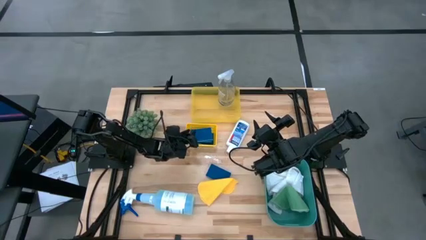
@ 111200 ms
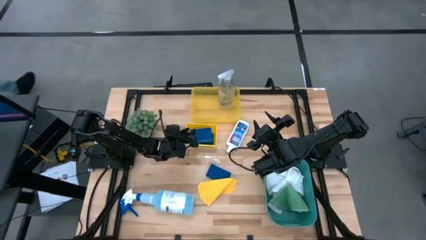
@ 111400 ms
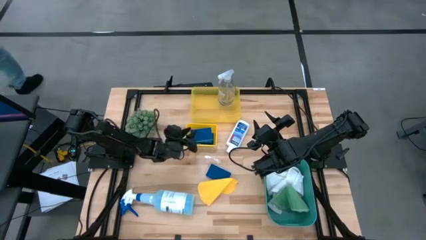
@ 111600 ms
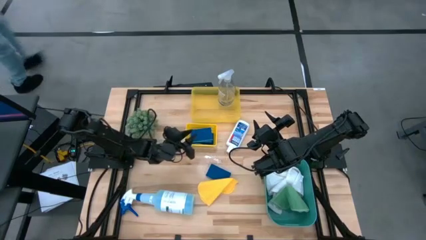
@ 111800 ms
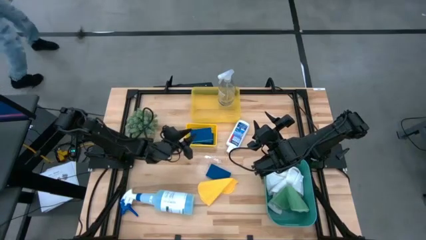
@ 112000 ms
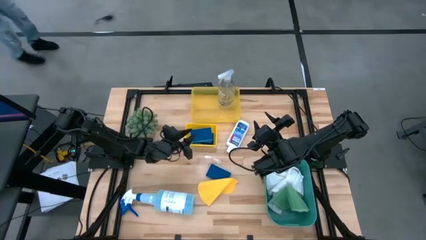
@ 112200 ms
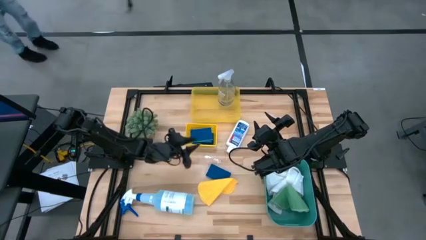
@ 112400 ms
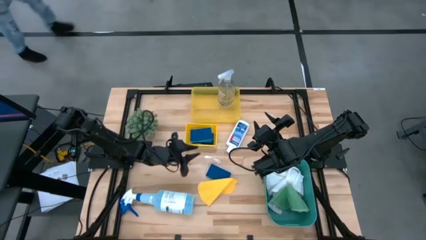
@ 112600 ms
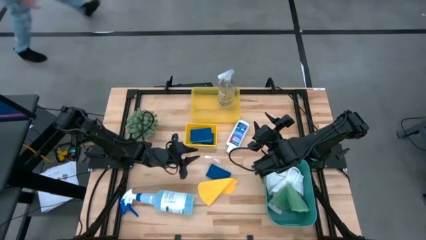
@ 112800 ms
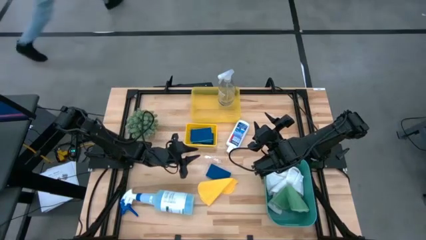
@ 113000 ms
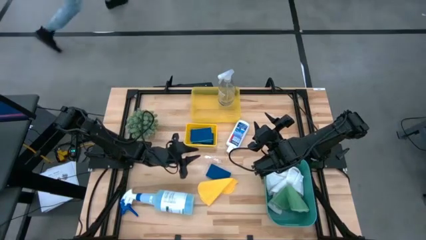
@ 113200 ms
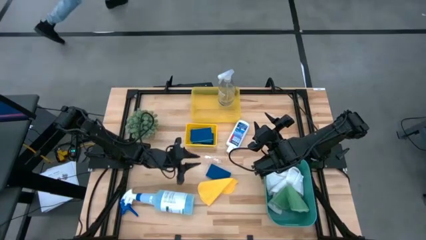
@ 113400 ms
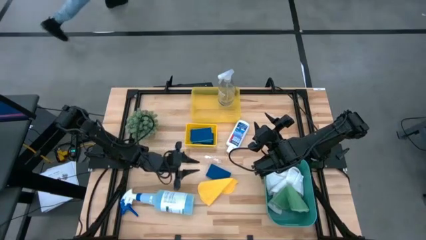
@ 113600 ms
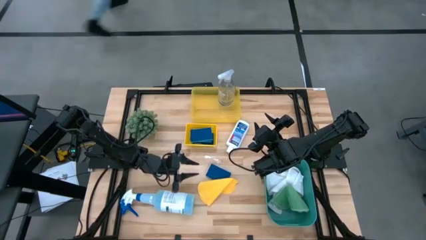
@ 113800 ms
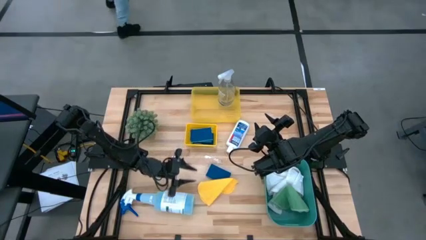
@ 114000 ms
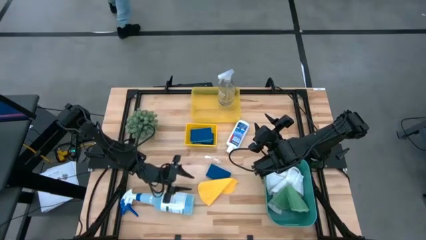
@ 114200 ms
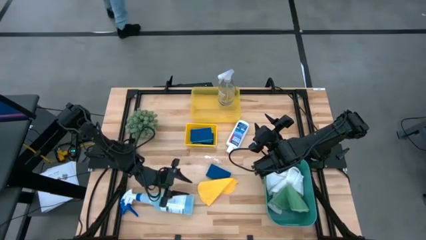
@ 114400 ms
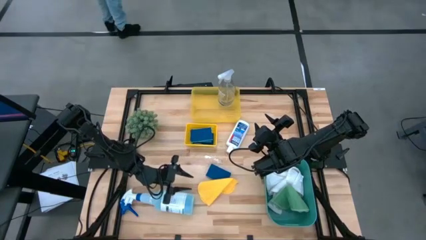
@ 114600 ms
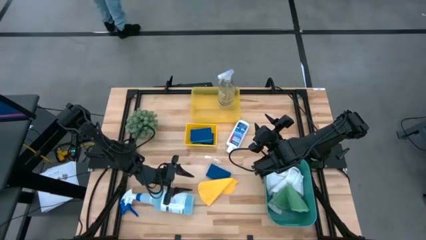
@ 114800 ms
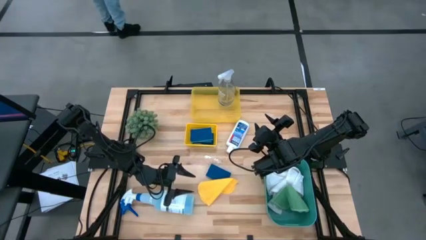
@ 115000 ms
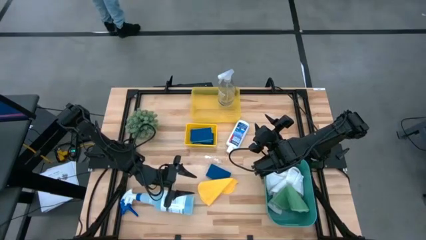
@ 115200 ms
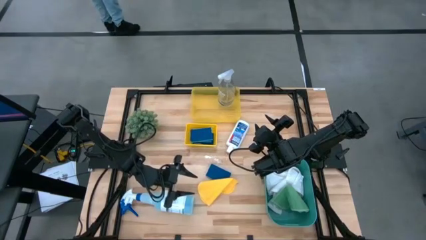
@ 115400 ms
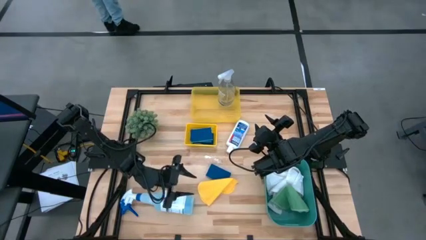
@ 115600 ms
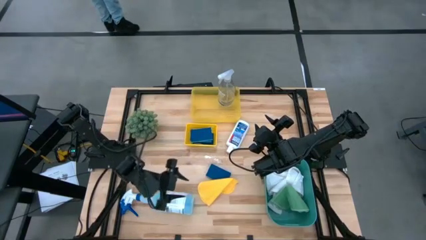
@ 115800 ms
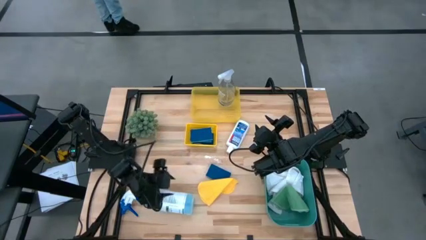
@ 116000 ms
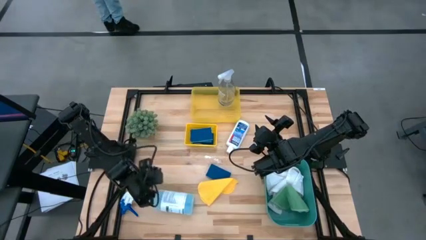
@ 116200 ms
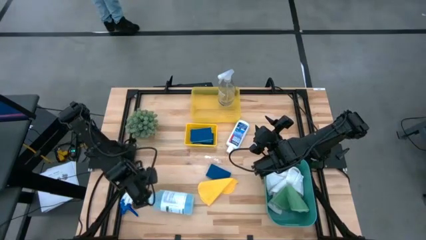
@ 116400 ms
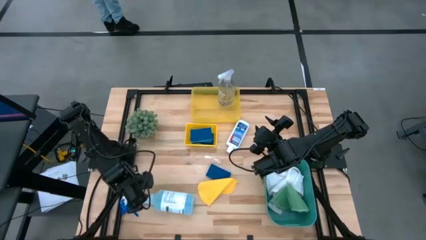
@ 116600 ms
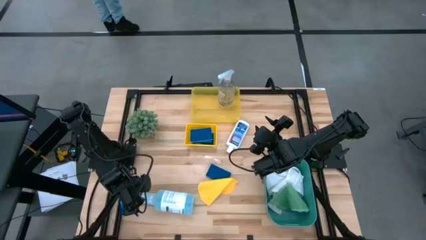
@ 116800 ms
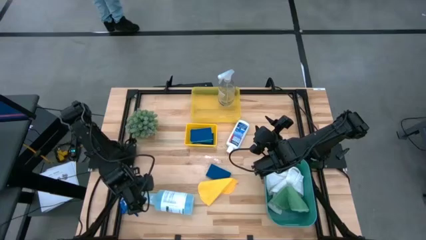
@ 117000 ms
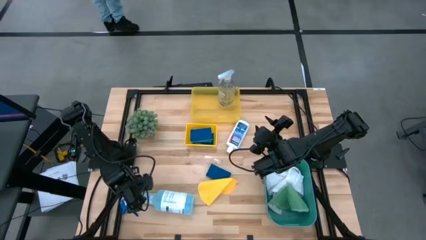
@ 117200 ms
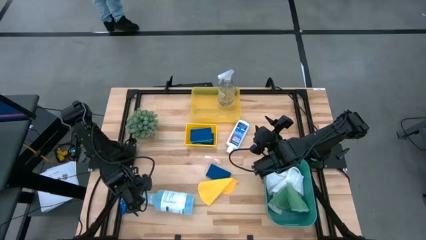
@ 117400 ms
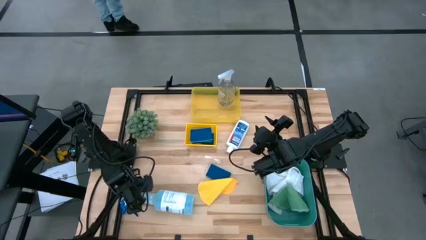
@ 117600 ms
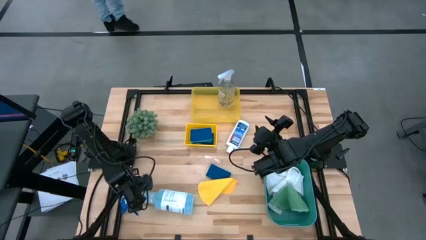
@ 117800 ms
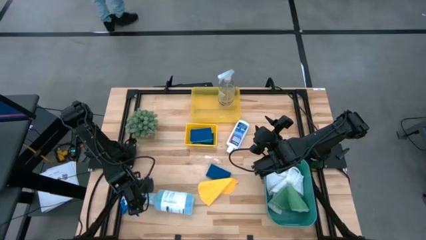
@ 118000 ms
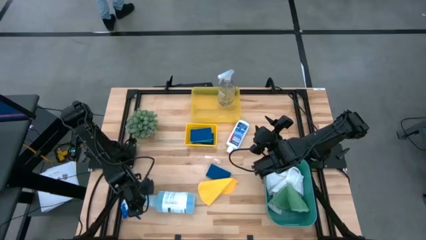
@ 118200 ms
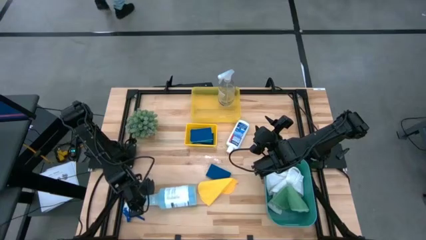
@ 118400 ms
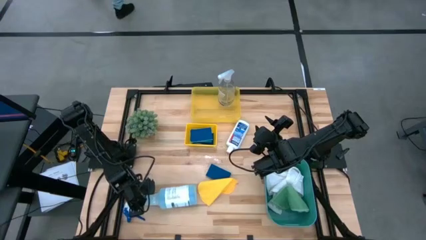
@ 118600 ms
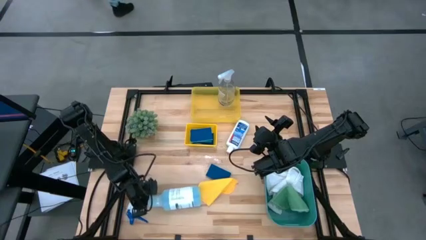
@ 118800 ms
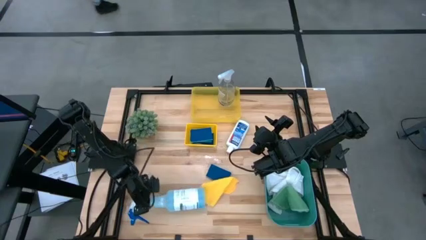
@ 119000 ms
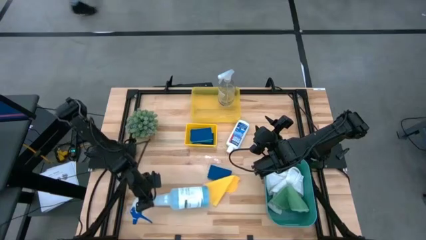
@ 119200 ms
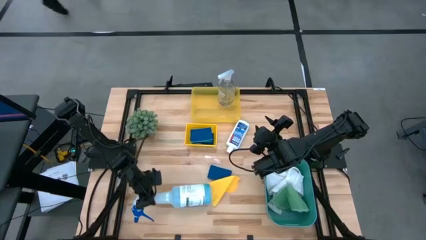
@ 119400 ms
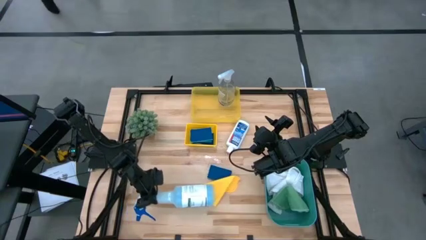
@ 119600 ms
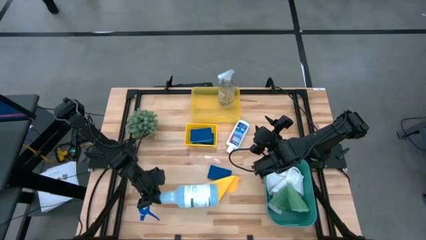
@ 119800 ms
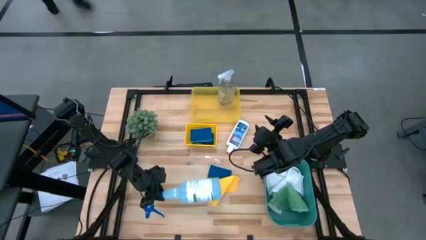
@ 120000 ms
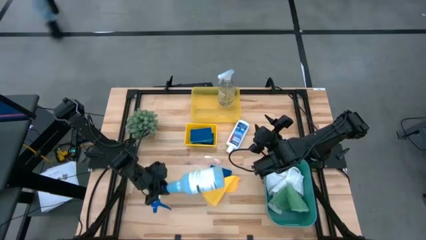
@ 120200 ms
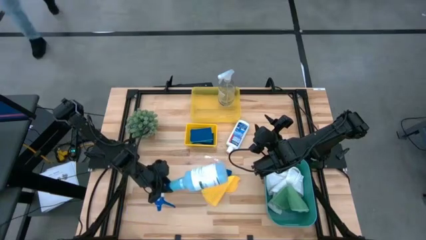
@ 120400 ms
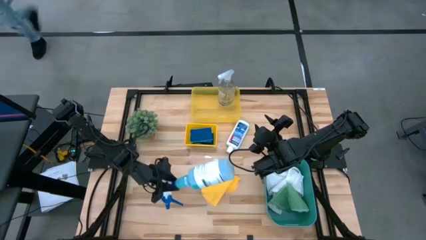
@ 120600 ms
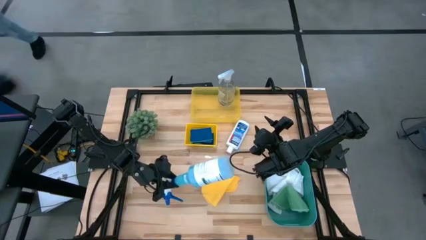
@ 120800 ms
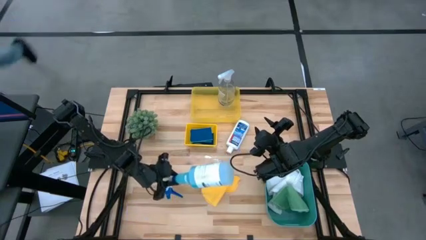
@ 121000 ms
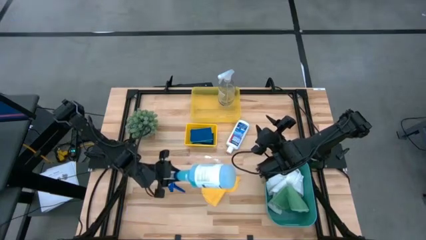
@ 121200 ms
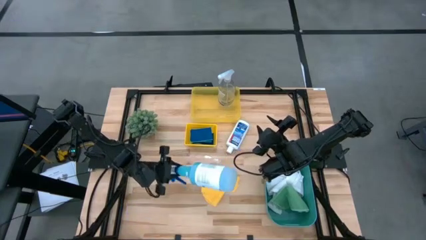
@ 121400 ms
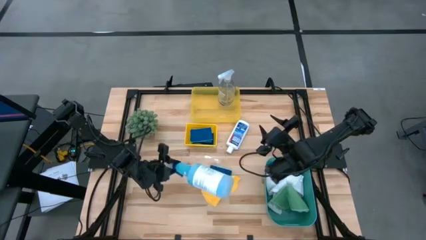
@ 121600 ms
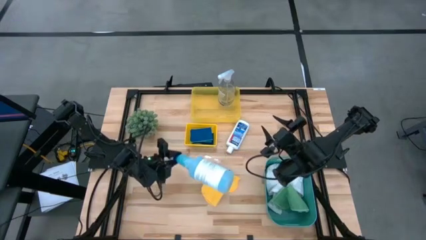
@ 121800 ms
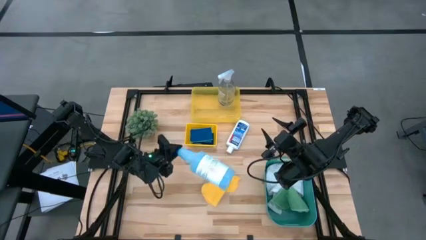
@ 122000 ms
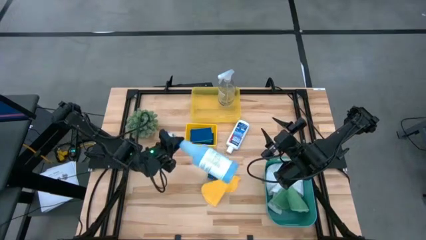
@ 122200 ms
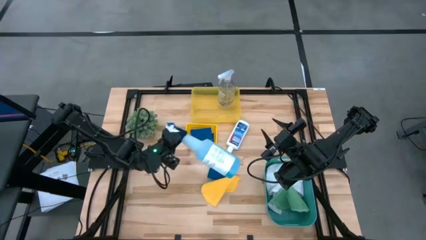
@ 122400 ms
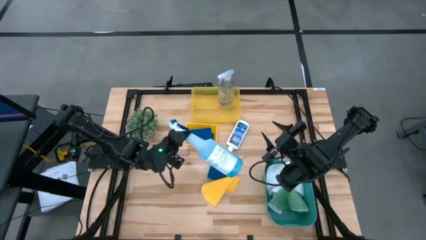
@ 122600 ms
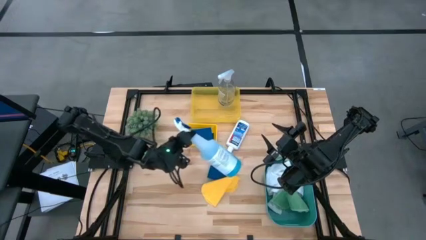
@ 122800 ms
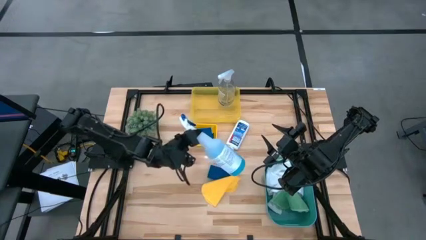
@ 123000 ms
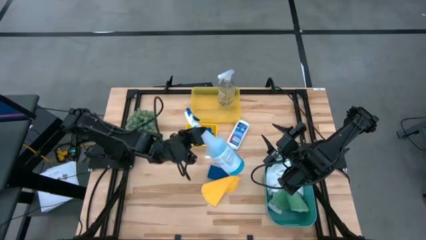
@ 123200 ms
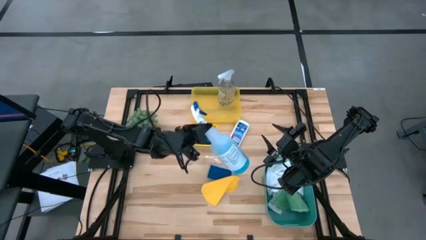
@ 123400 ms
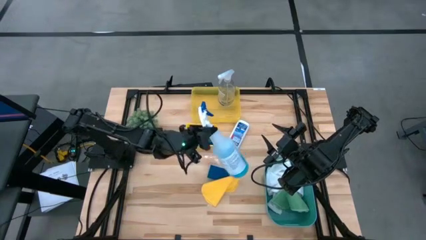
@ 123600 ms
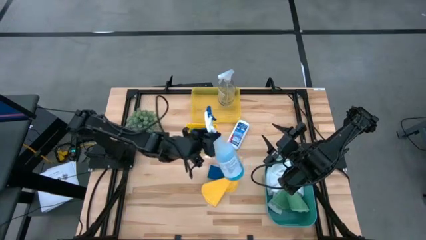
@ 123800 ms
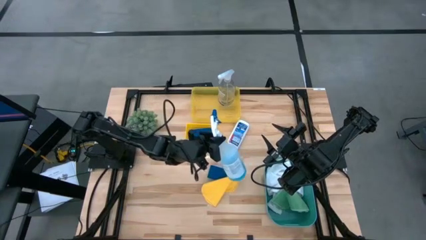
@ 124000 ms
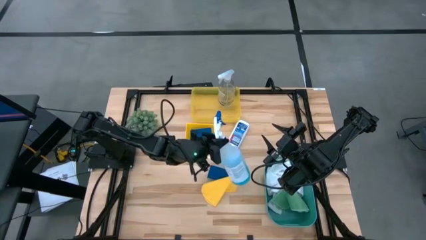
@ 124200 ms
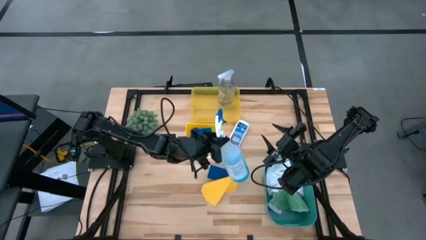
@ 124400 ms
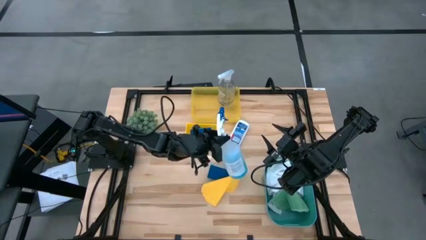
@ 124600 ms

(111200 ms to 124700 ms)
Task: Pick & Place Kitchen Items
Put the blue bottle into the top yellow bin
